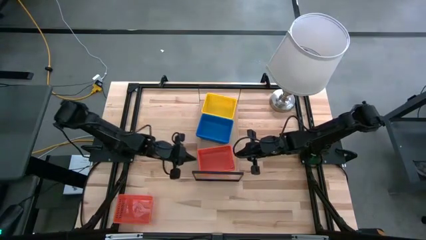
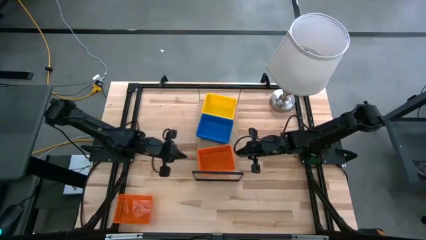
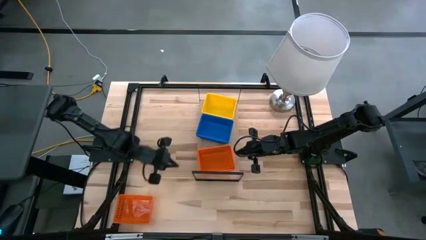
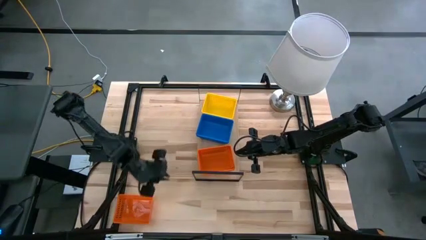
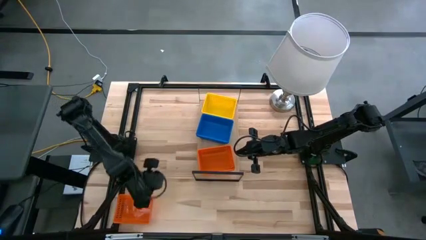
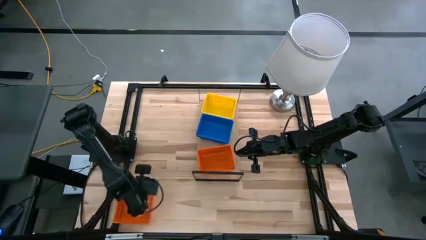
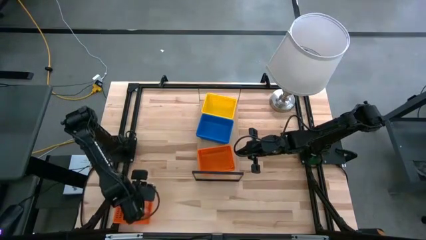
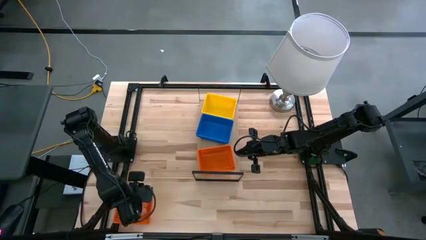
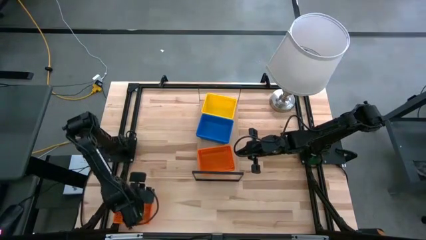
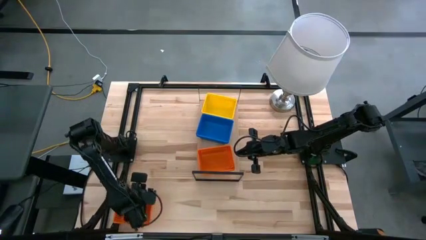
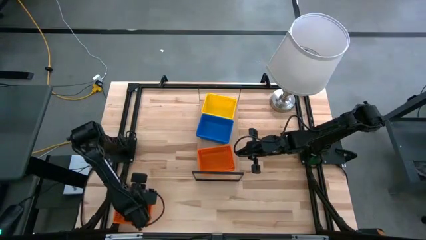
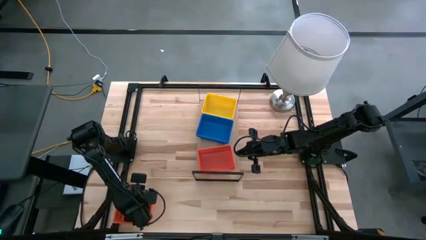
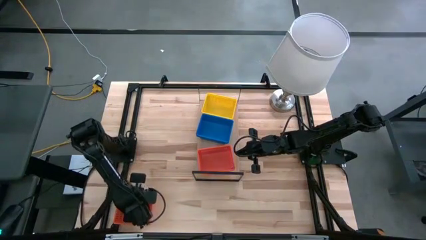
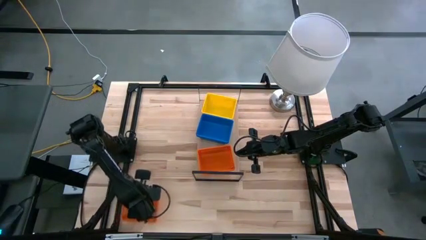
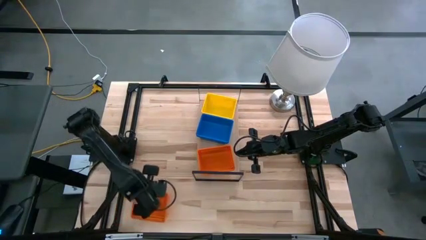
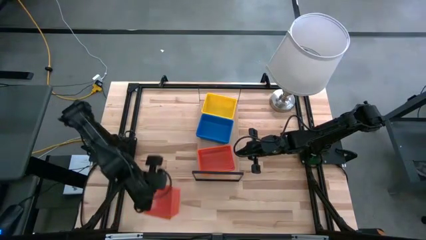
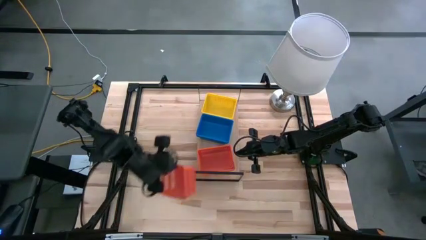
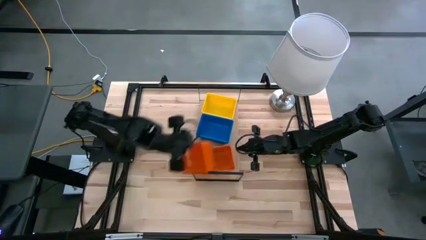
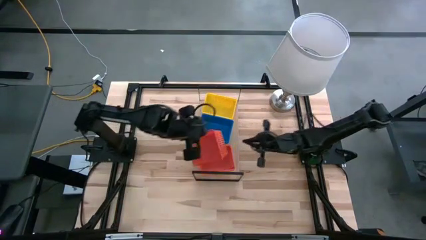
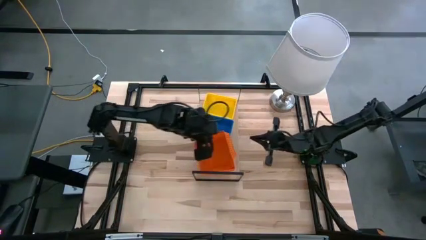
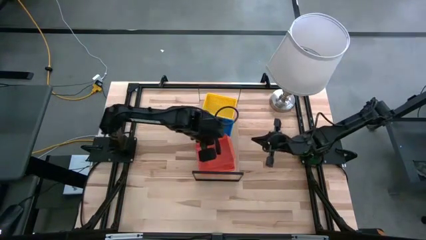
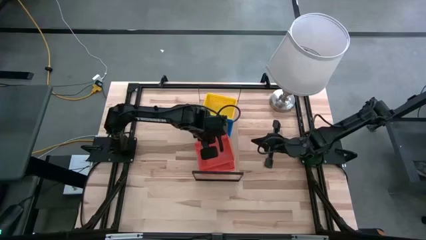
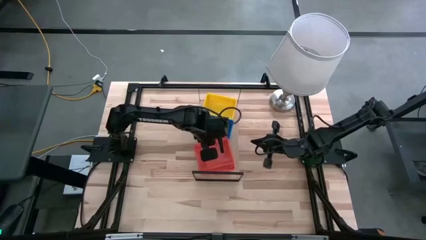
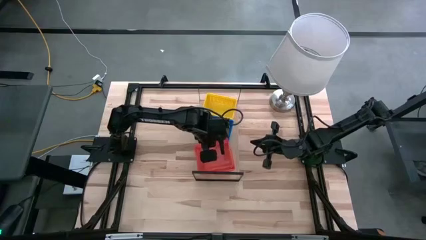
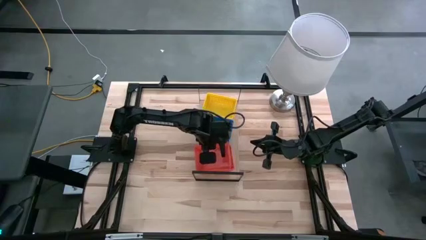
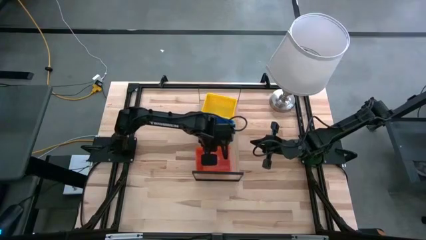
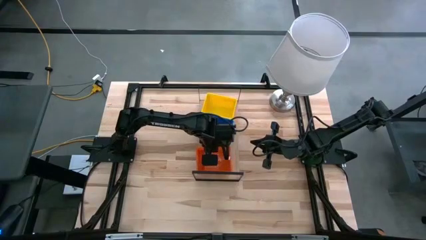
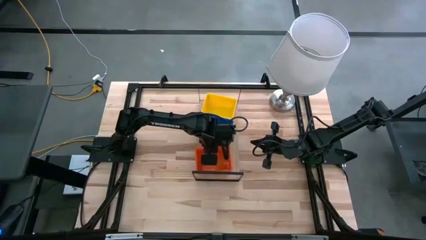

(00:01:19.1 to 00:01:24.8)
Task: Stack baskets on shelf by color
Stack the orange bin on top of the orange bin on the shelf

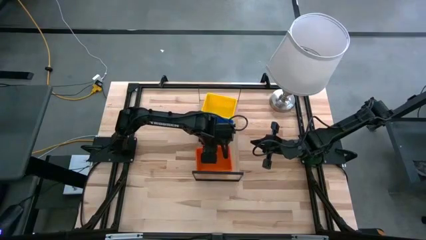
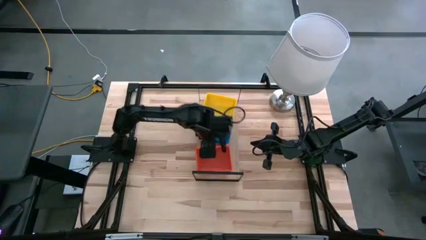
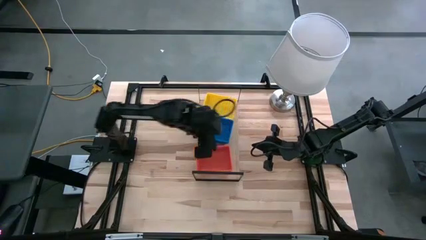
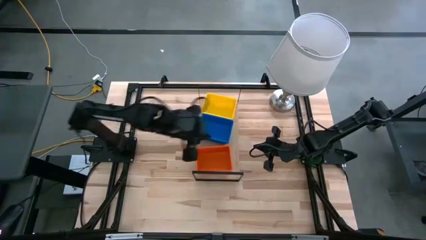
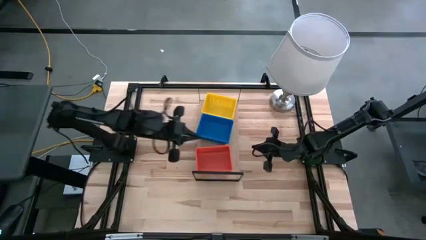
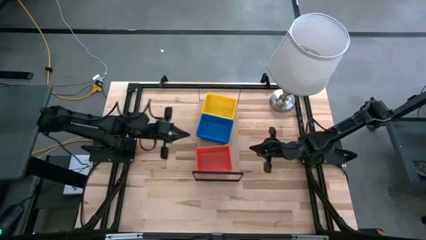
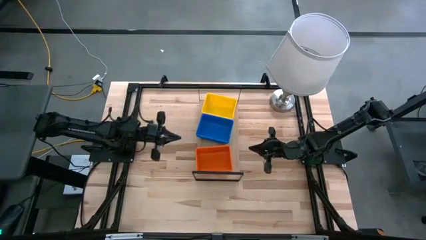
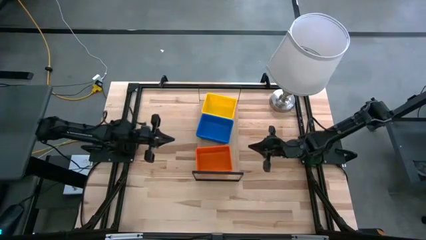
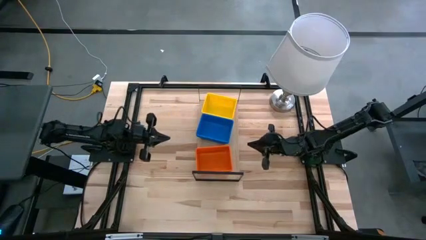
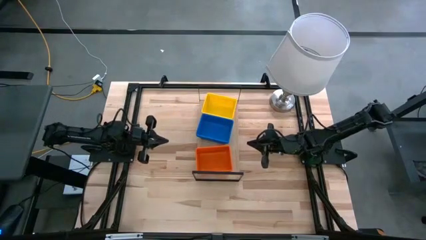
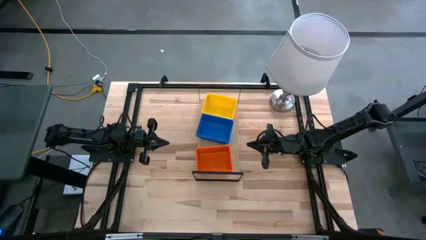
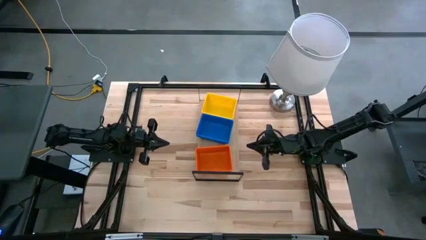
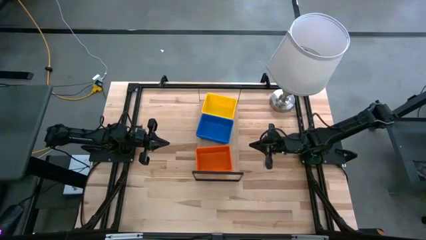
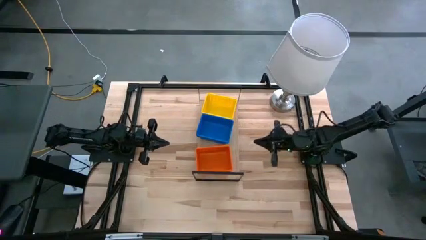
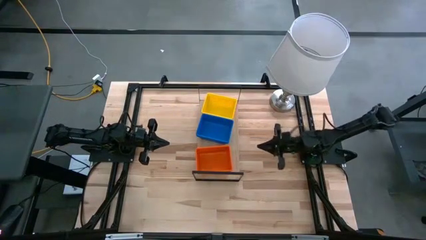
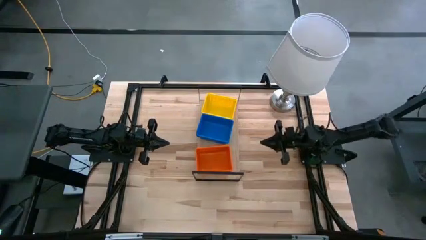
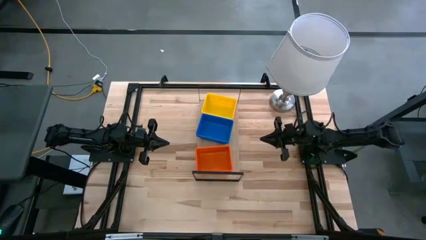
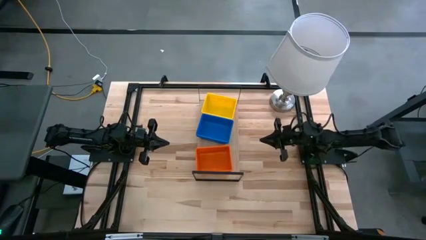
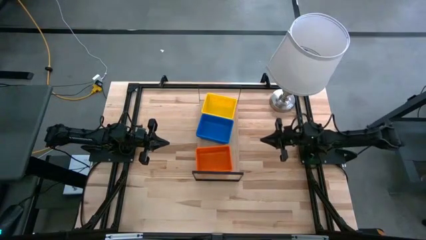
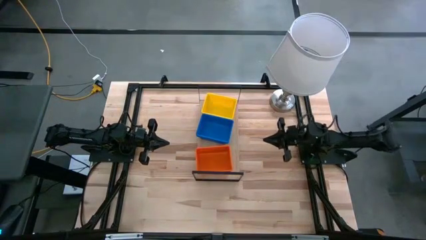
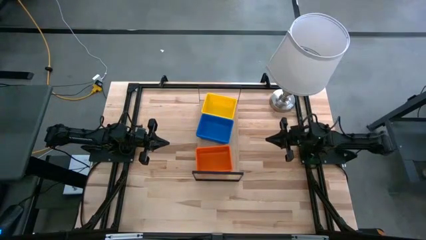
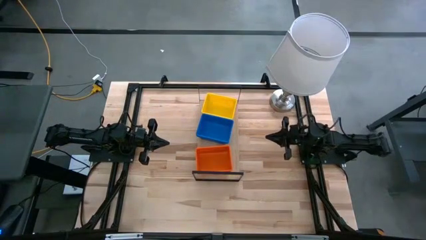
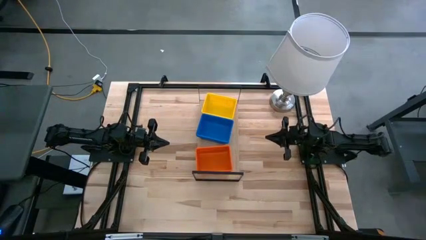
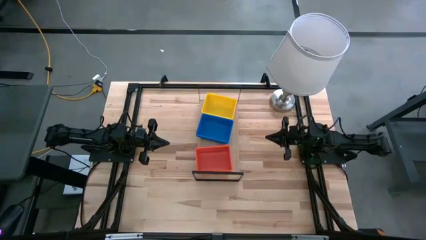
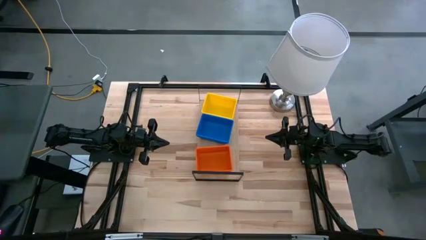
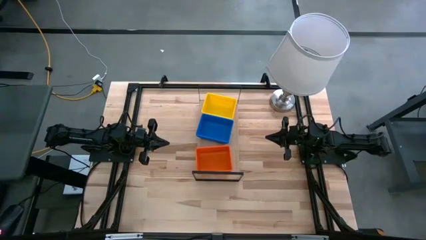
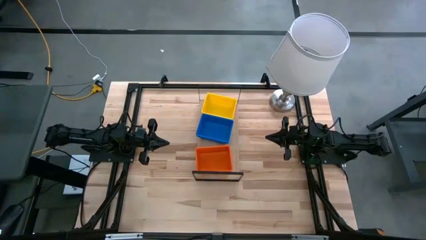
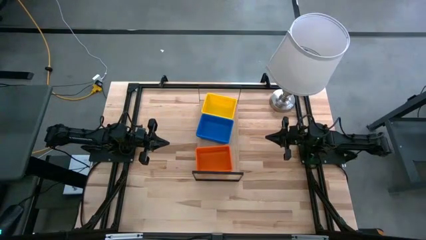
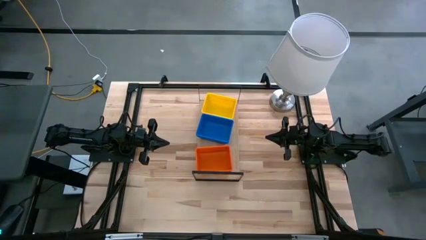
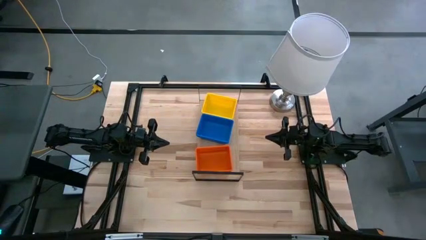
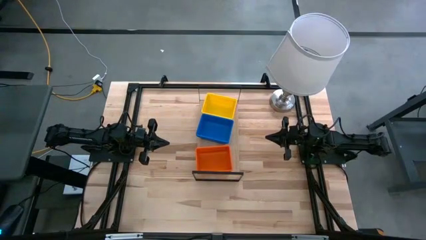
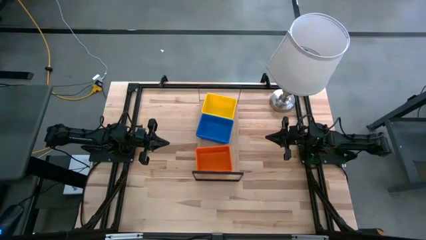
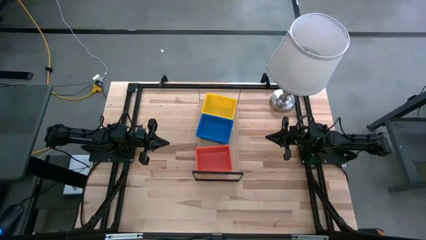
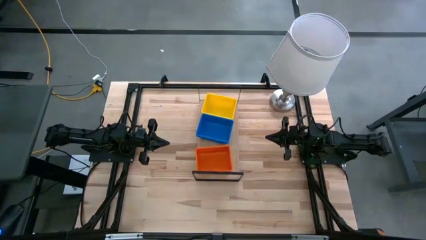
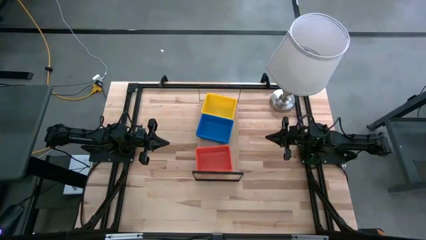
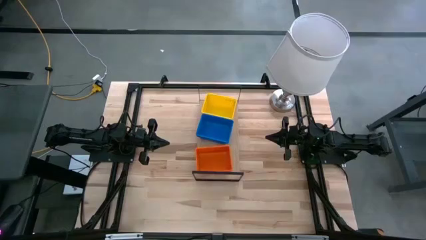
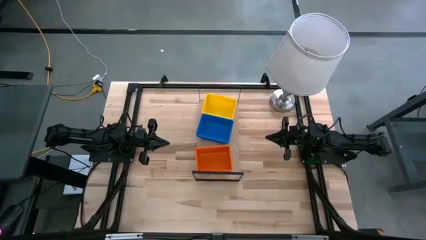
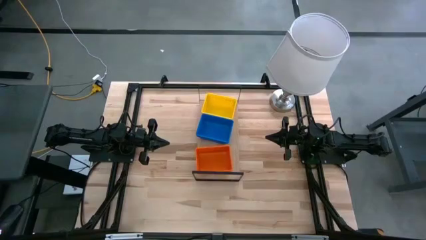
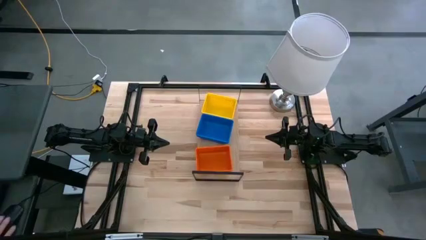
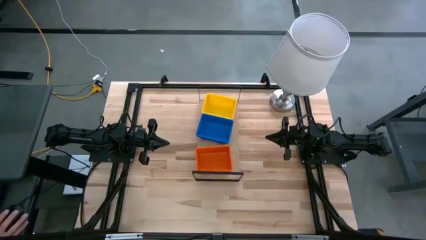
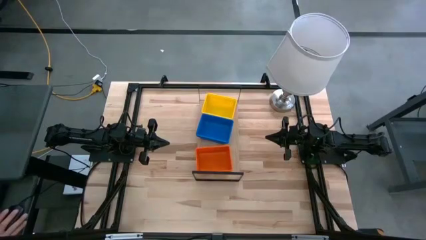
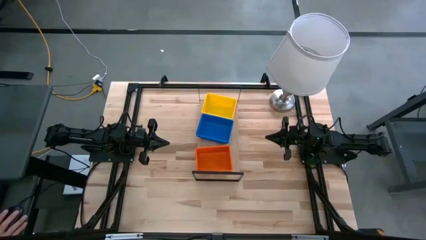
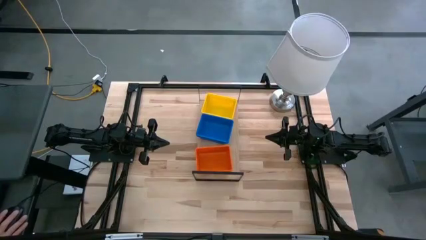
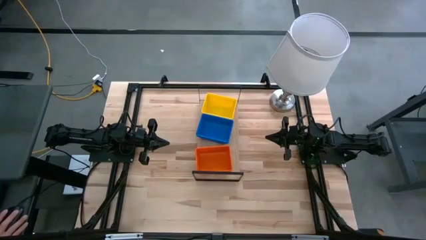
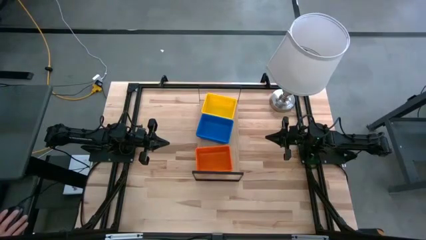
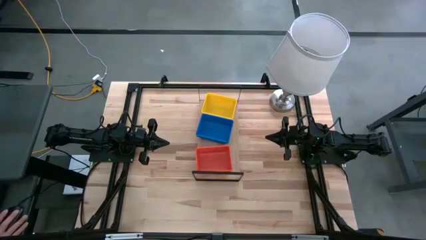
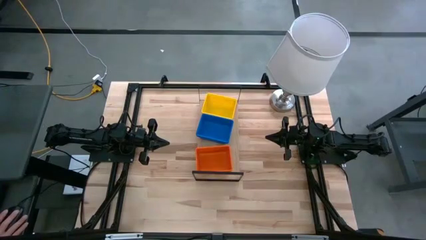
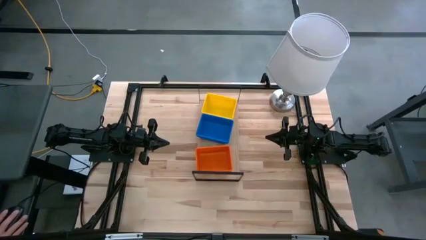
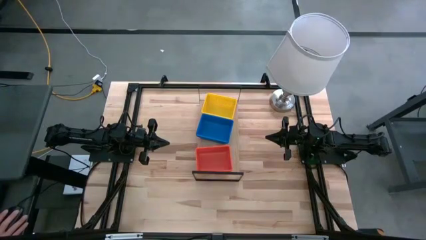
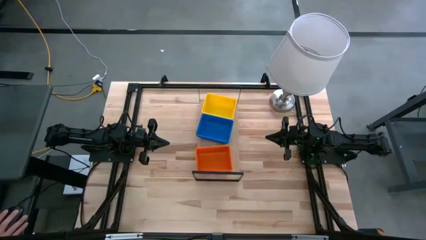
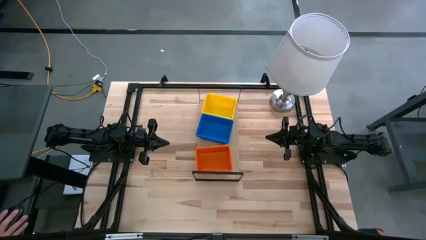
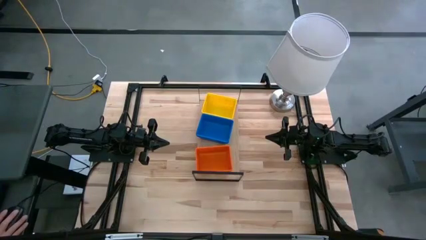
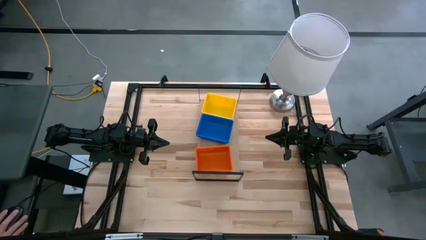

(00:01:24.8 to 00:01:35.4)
Return to Home Position
